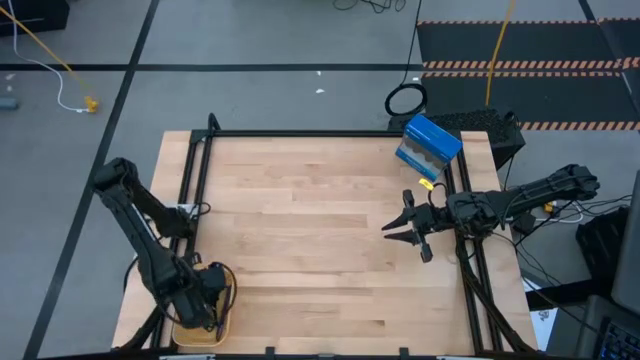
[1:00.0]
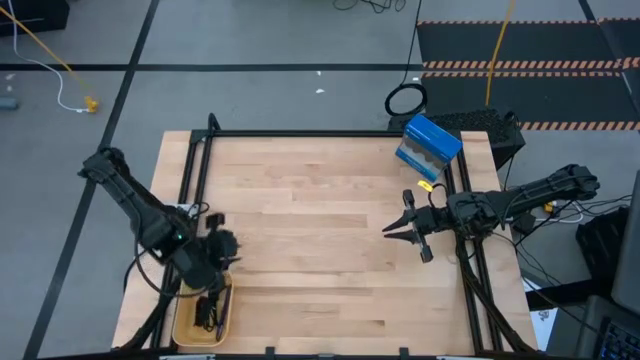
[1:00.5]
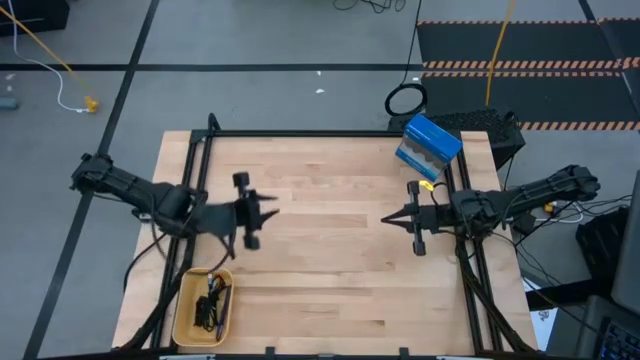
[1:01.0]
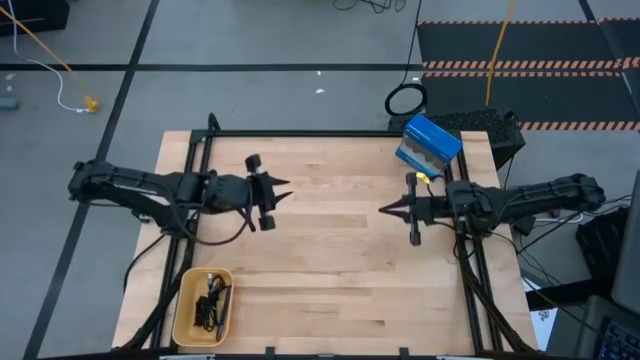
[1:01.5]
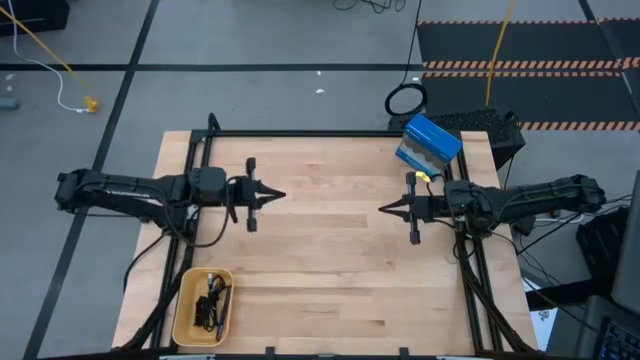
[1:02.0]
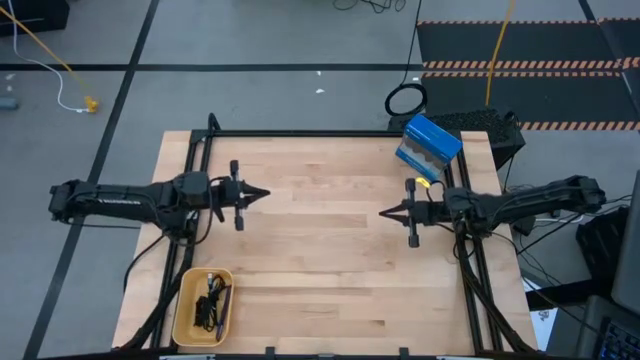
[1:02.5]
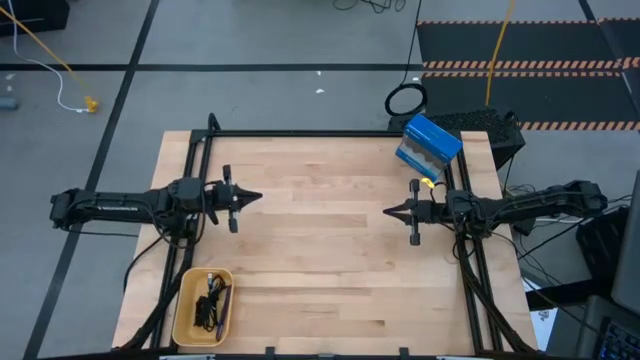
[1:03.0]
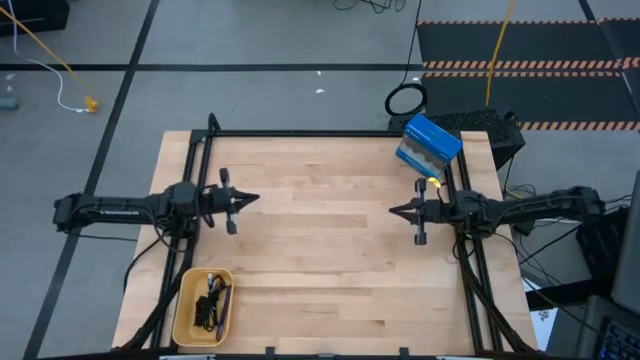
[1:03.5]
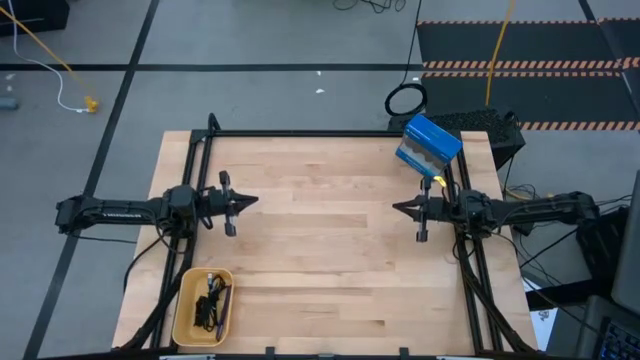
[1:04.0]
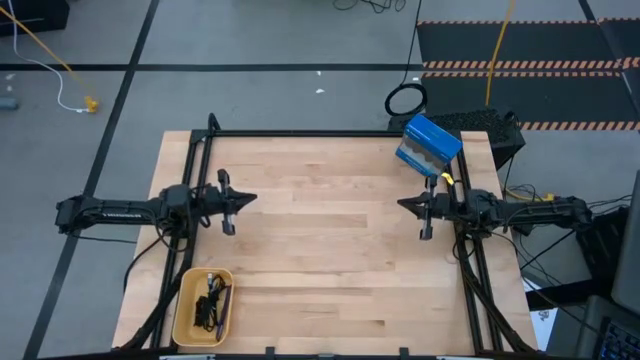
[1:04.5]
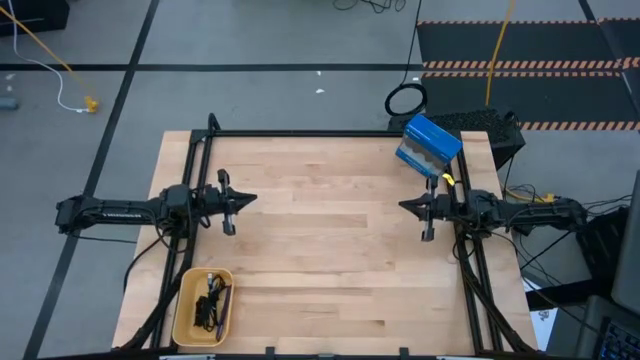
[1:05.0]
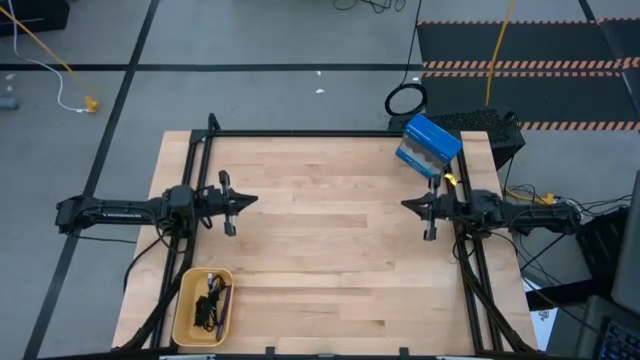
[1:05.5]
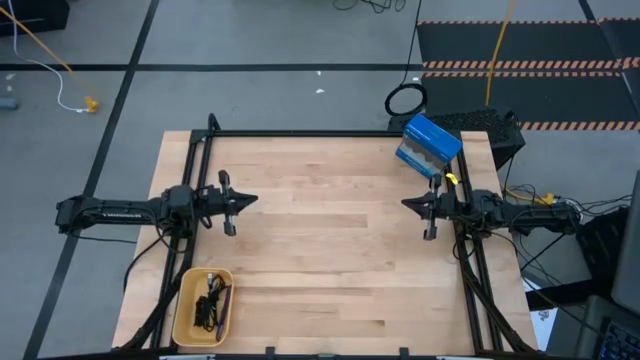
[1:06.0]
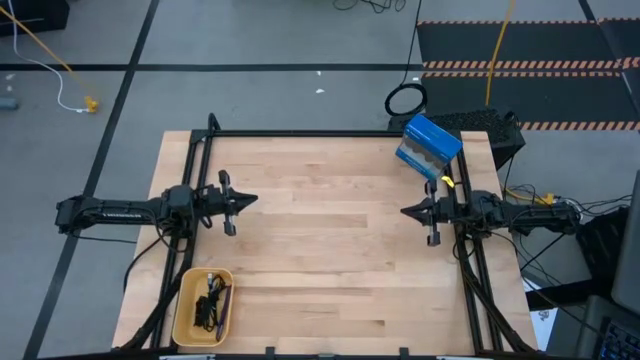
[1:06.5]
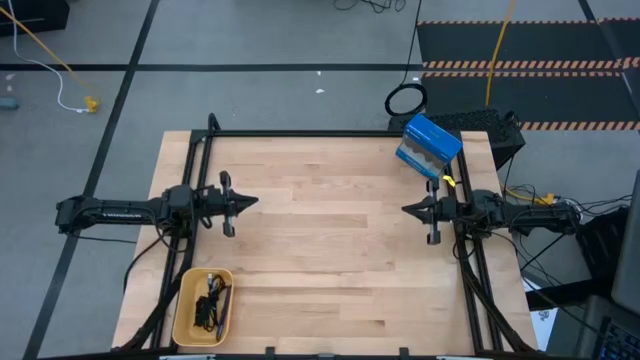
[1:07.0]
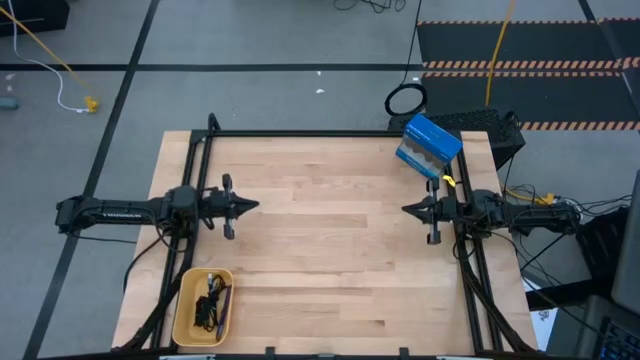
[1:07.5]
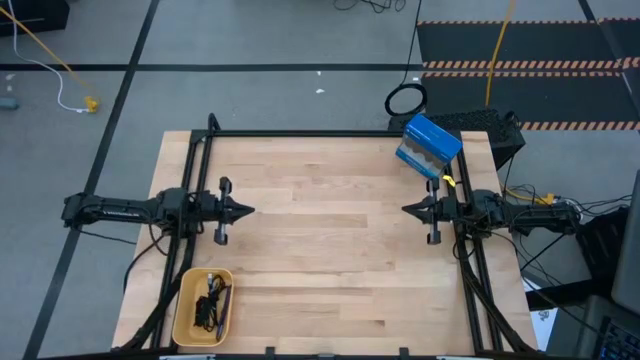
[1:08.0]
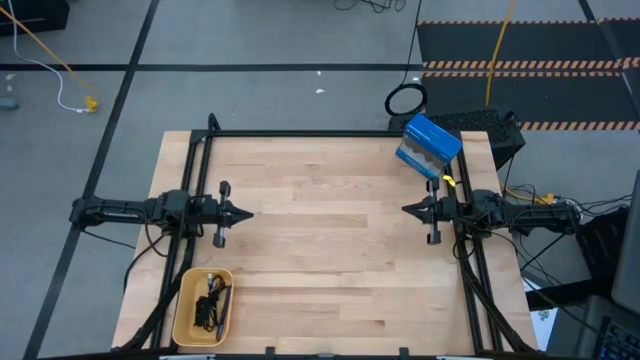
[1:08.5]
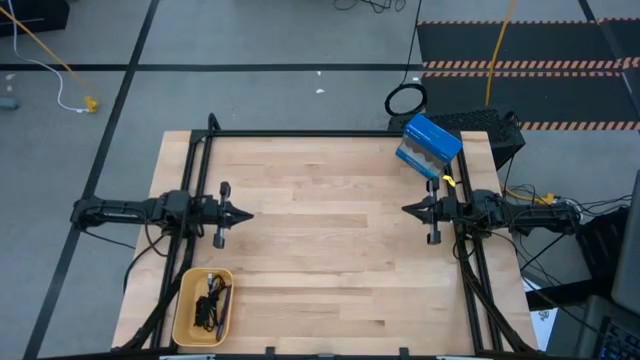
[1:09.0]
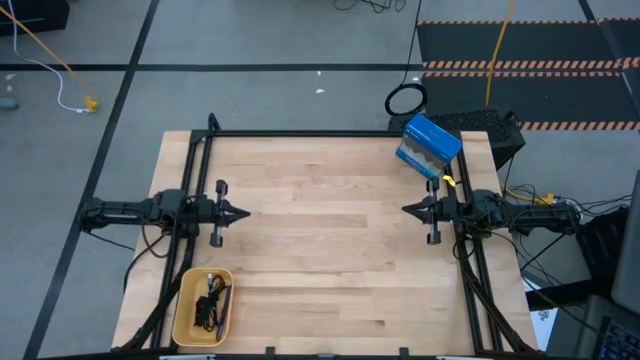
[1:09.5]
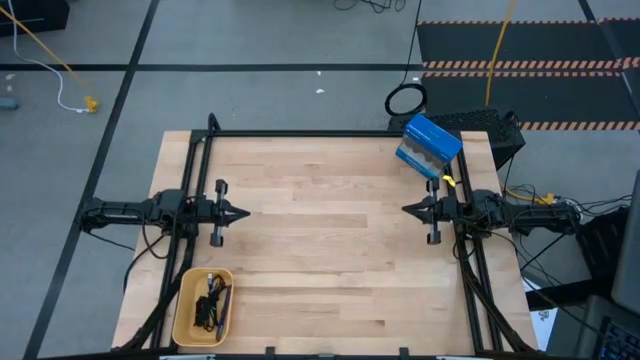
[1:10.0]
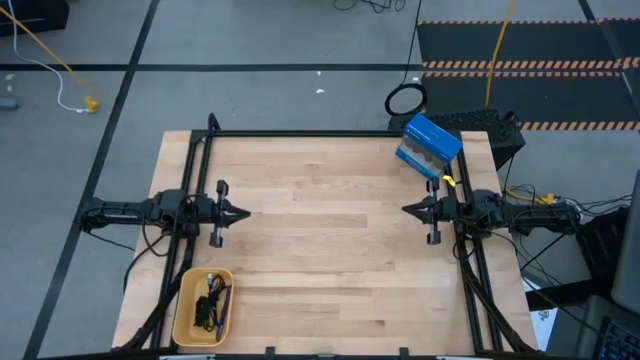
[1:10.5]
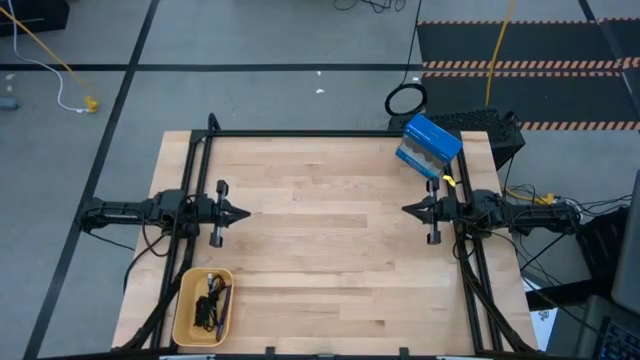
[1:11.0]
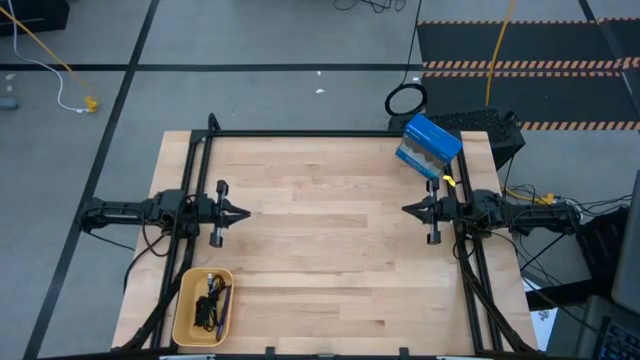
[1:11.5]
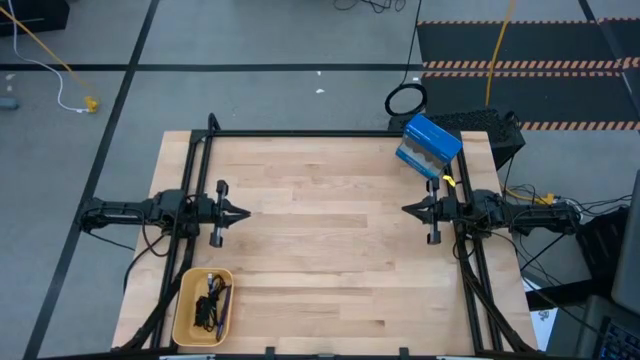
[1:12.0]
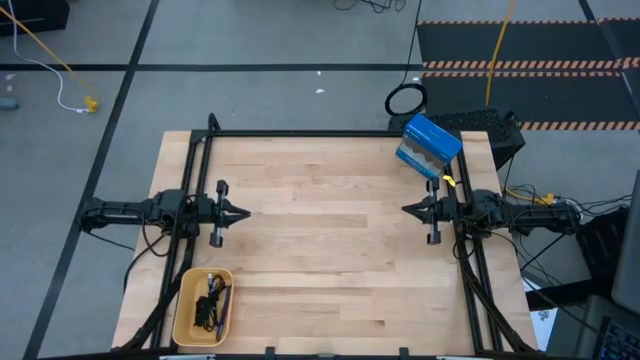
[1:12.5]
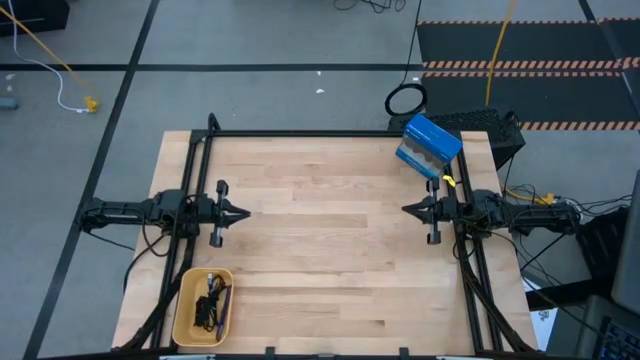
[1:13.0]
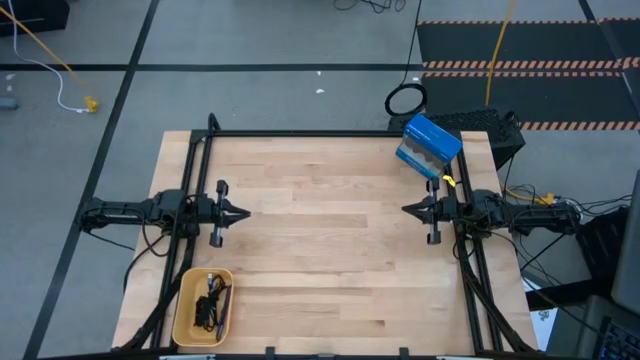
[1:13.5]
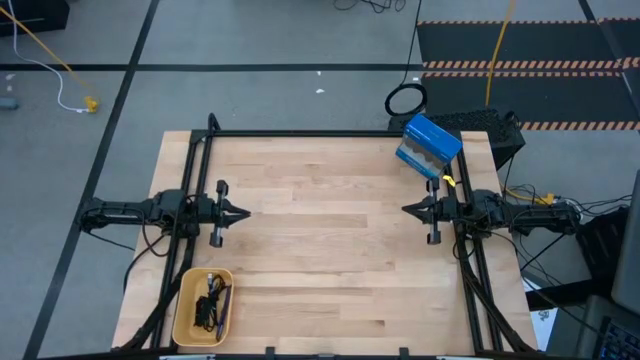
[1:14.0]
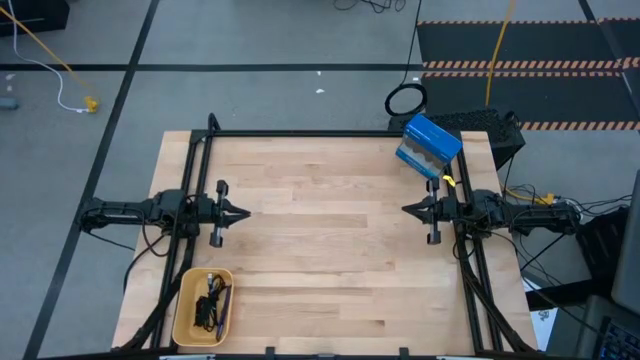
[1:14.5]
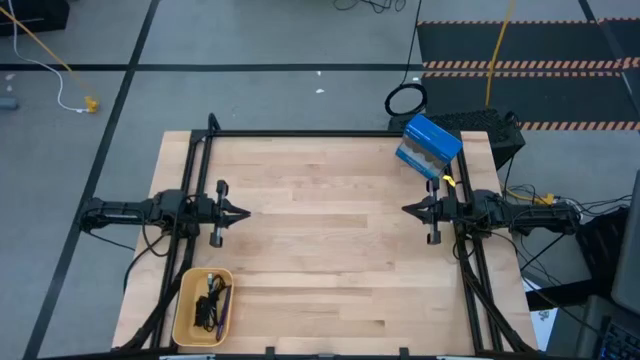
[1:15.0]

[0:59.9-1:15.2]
Task: Pick and place USB-C Cables
Return to Home Position

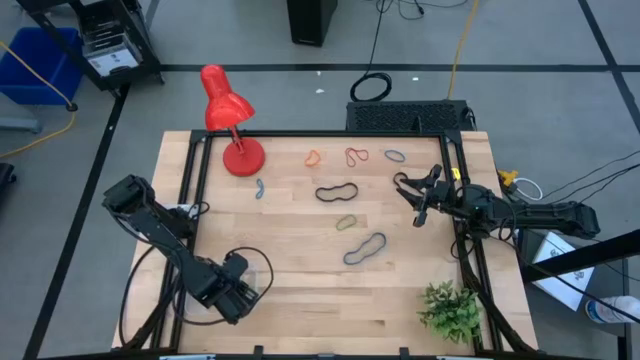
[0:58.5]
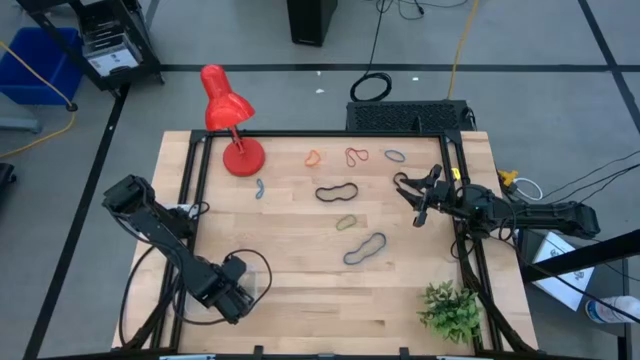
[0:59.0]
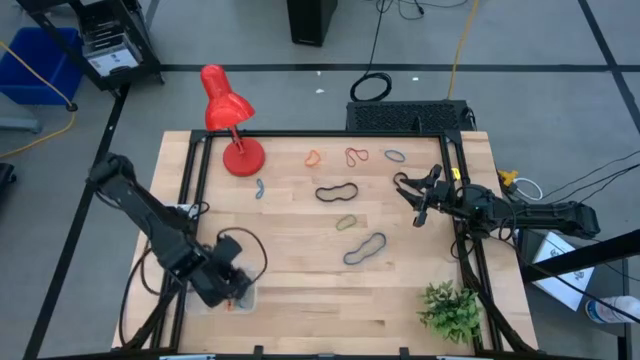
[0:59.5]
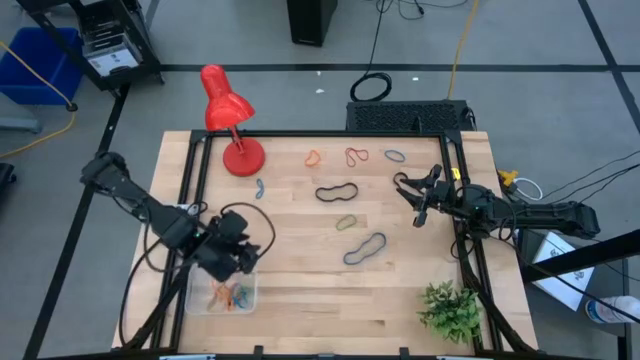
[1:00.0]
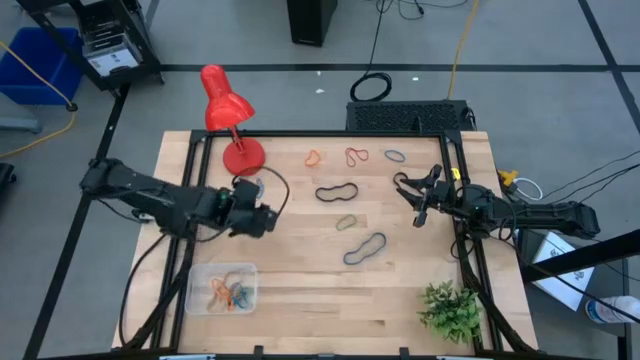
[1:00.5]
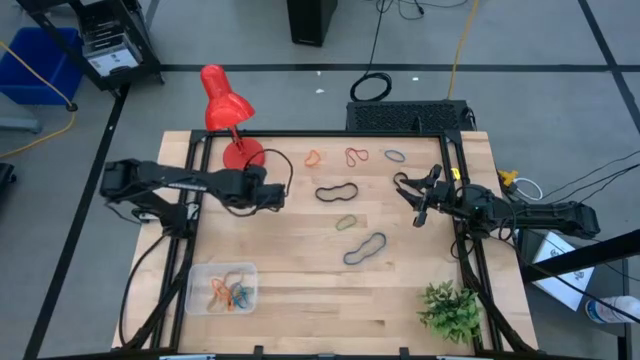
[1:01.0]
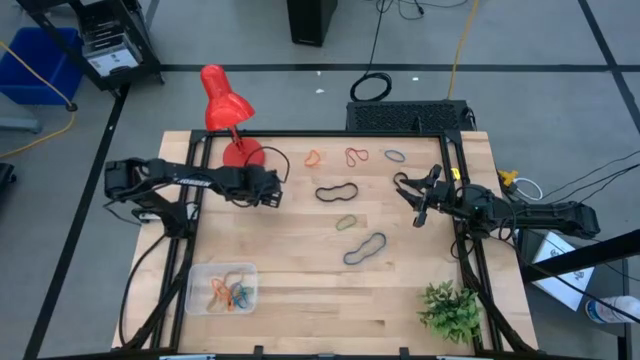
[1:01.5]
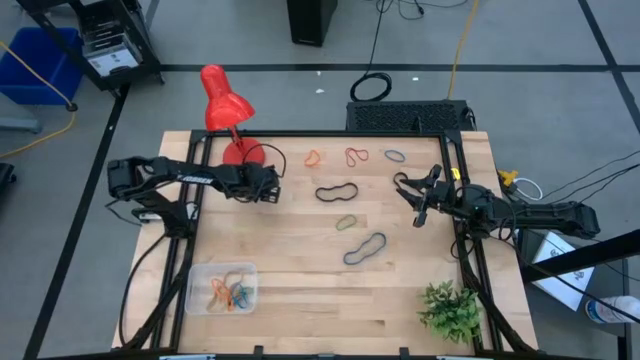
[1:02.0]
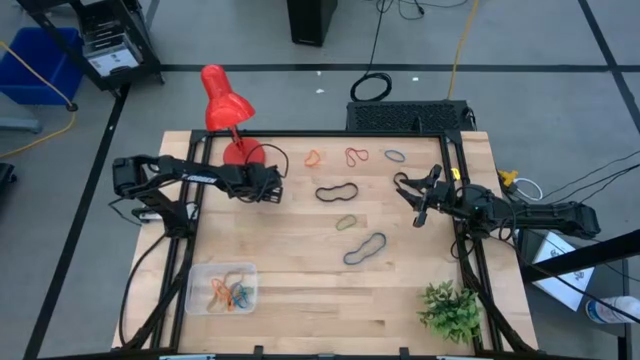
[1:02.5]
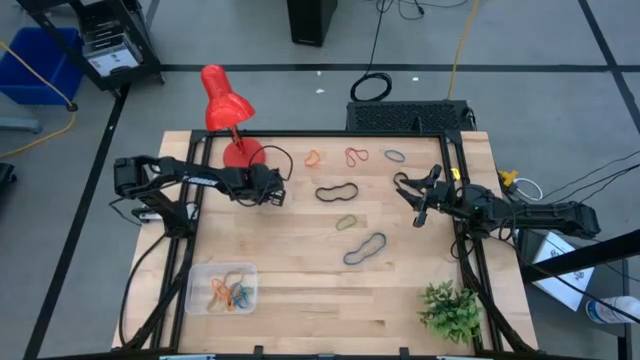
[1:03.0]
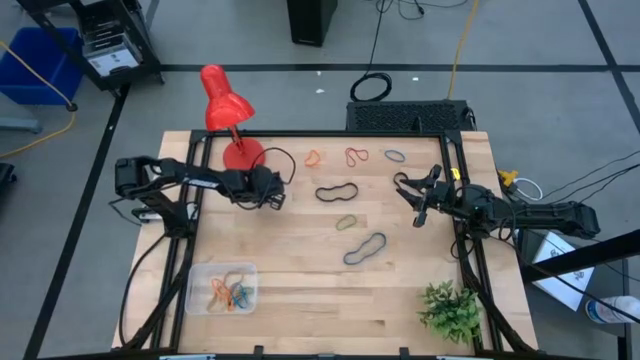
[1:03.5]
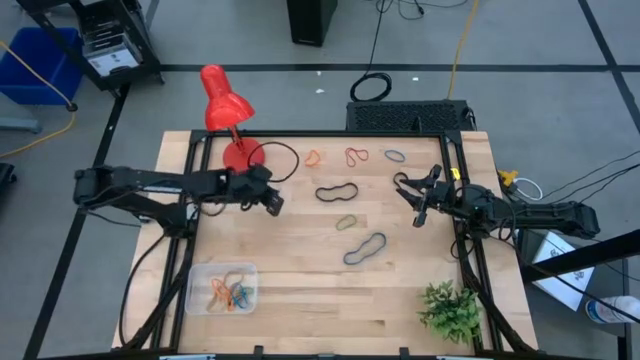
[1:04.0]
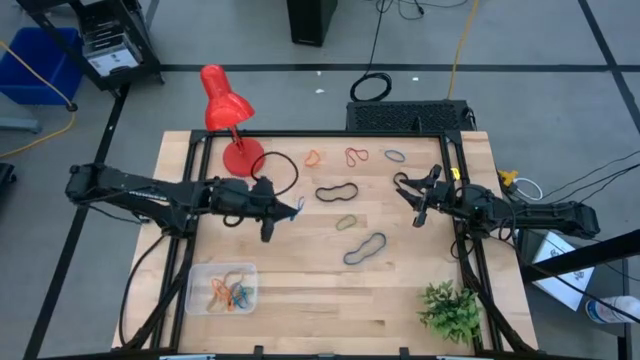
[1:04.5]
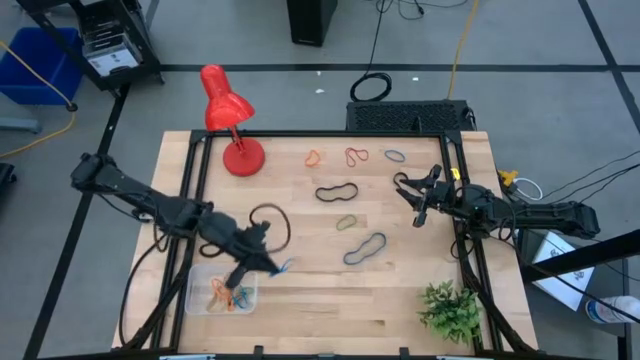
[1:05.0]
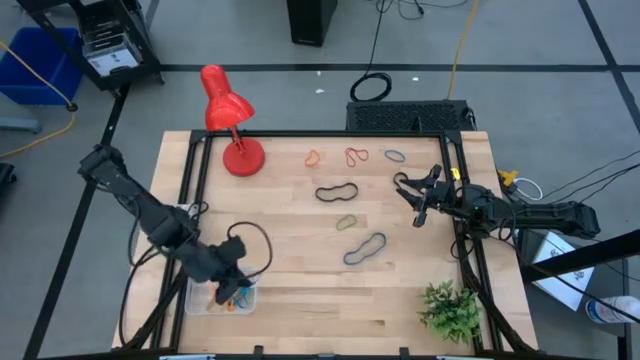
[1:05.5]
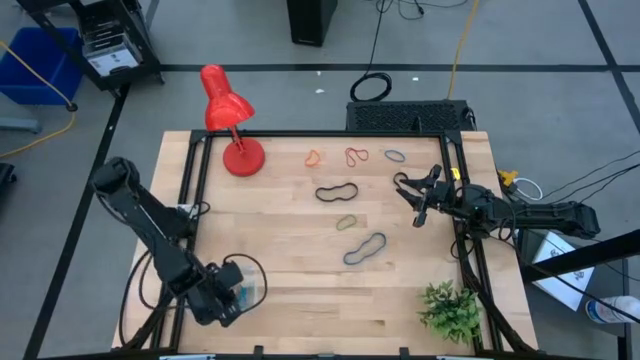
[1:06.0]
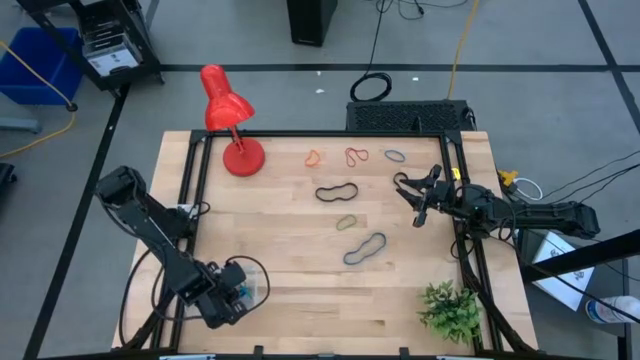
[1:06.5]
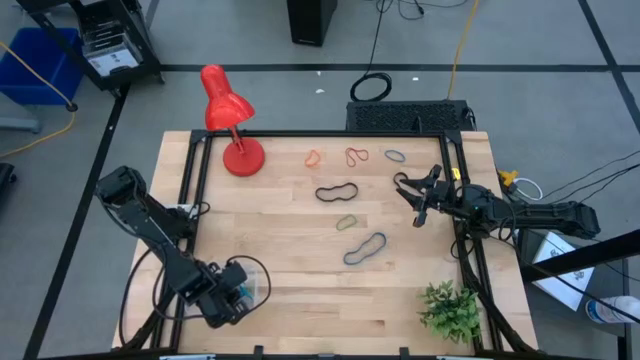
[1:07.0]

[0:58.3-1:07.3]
Task: Pick and place rubber bands into bin
Put the bottom blue rubber band into the transparent bin
